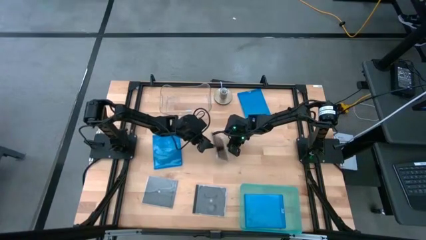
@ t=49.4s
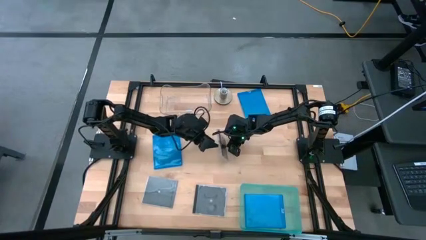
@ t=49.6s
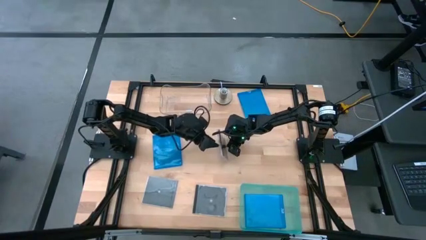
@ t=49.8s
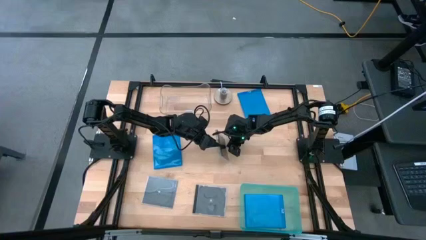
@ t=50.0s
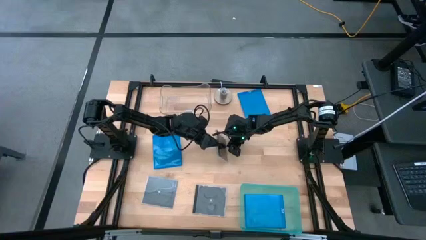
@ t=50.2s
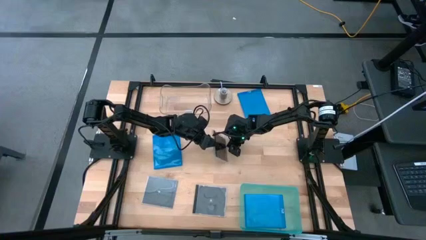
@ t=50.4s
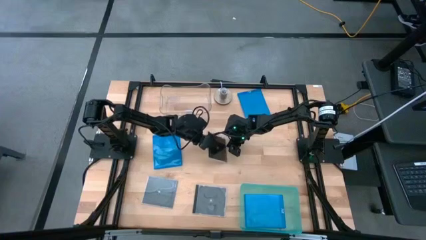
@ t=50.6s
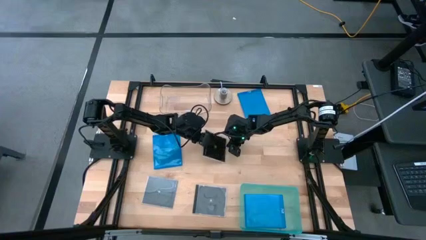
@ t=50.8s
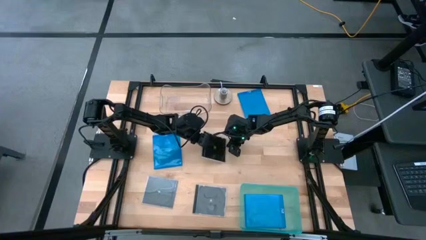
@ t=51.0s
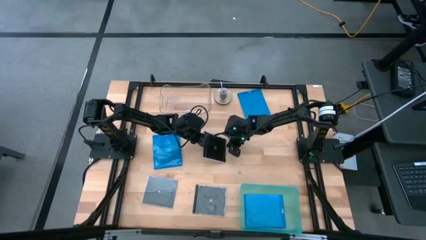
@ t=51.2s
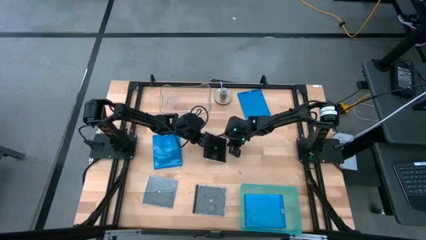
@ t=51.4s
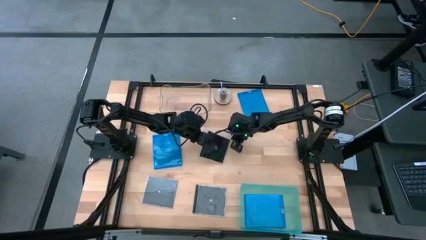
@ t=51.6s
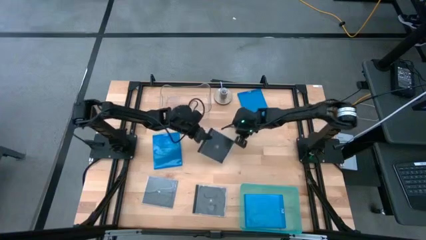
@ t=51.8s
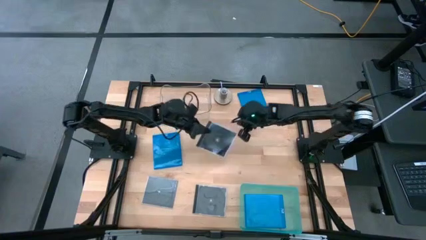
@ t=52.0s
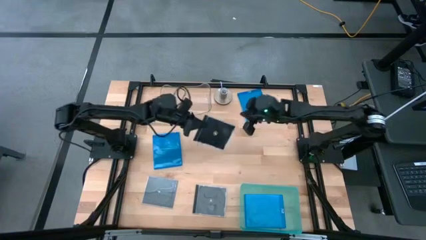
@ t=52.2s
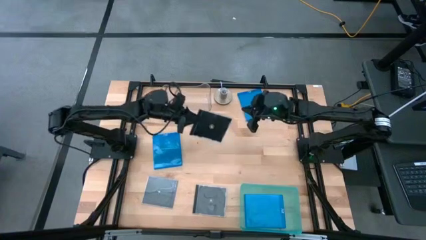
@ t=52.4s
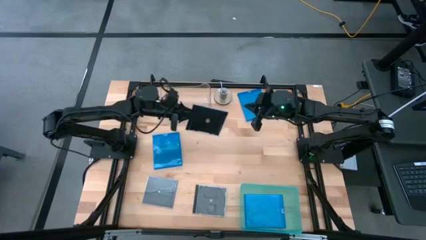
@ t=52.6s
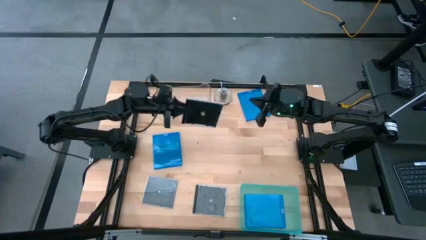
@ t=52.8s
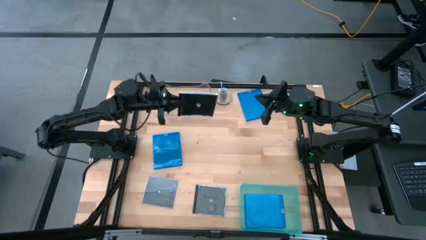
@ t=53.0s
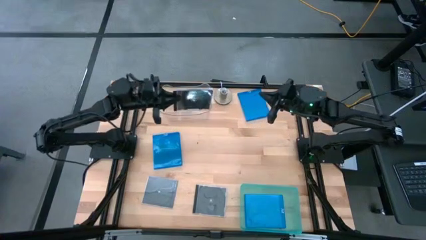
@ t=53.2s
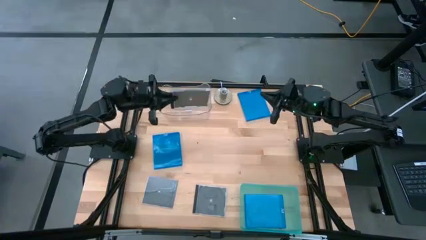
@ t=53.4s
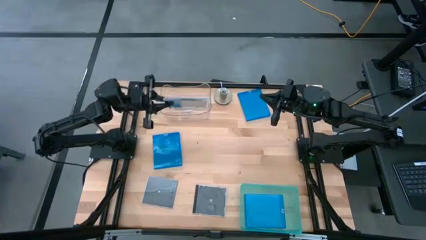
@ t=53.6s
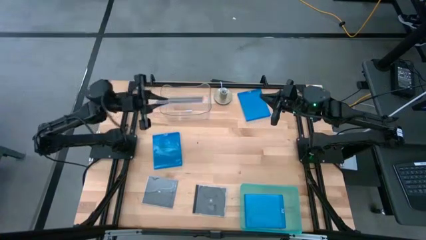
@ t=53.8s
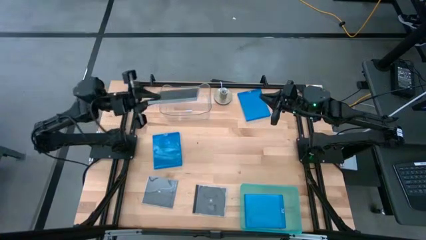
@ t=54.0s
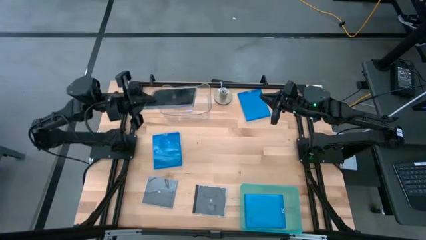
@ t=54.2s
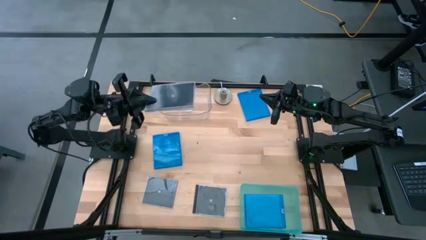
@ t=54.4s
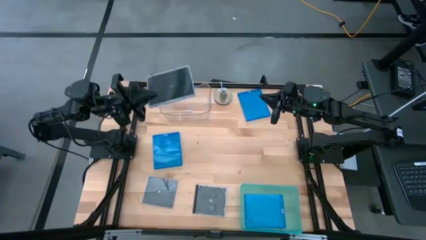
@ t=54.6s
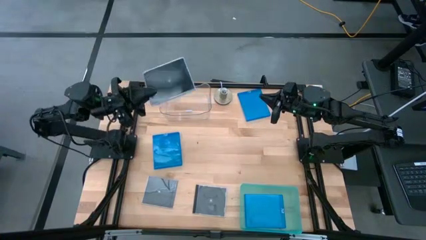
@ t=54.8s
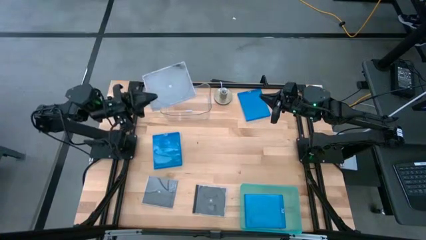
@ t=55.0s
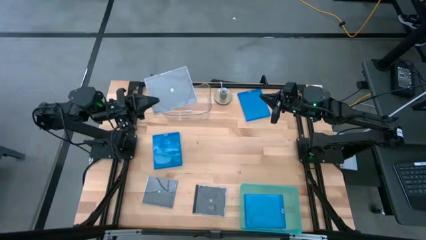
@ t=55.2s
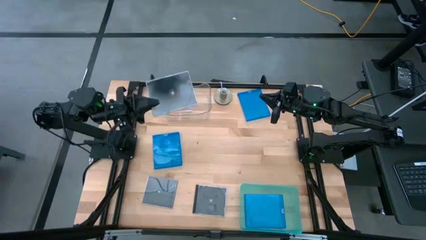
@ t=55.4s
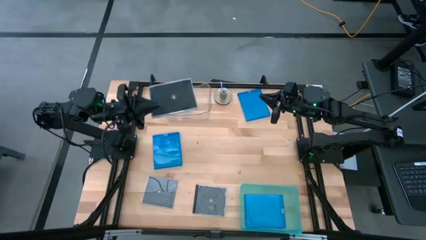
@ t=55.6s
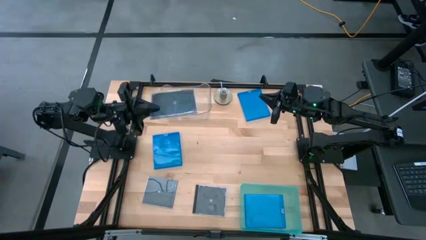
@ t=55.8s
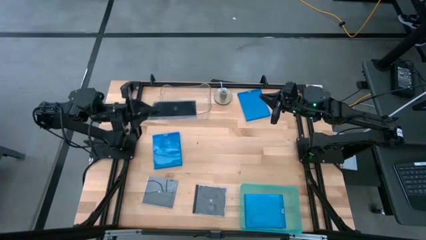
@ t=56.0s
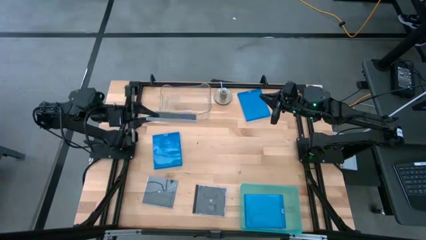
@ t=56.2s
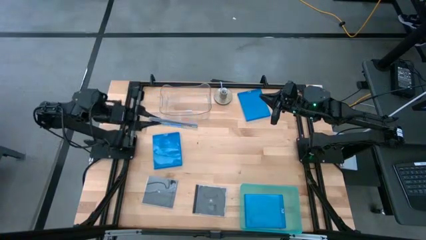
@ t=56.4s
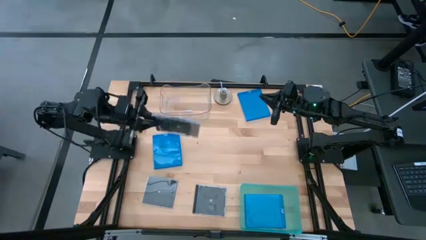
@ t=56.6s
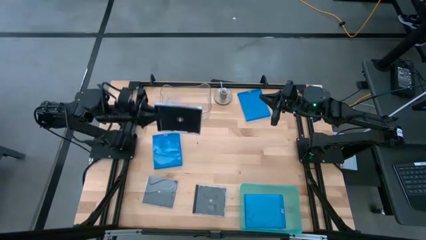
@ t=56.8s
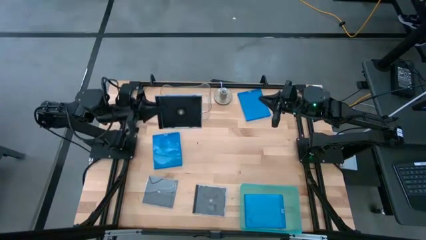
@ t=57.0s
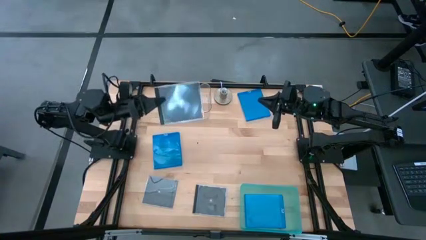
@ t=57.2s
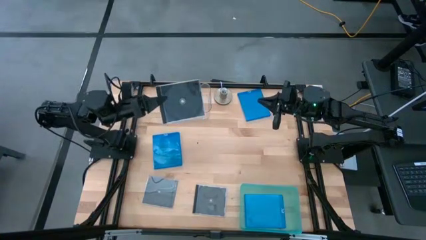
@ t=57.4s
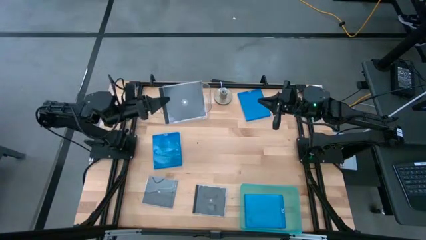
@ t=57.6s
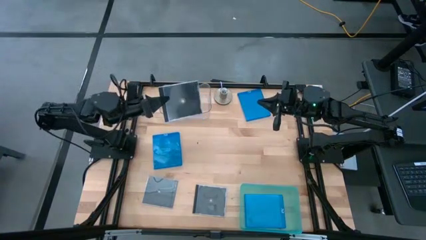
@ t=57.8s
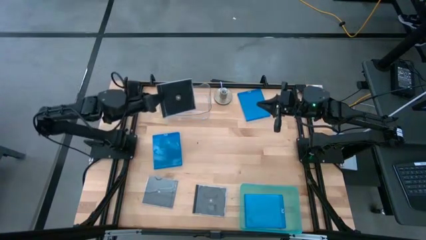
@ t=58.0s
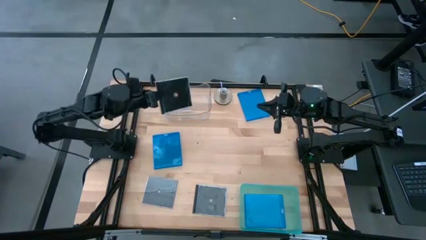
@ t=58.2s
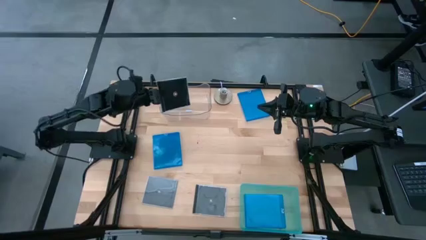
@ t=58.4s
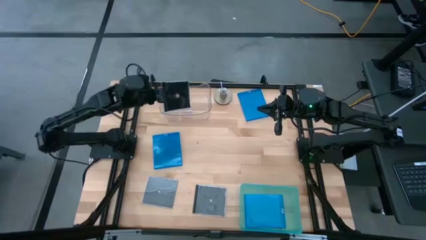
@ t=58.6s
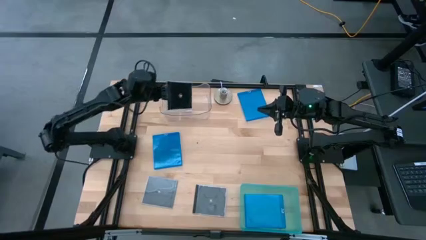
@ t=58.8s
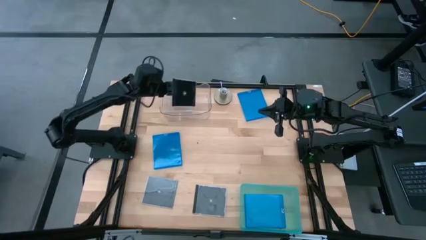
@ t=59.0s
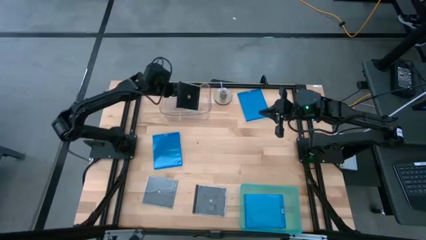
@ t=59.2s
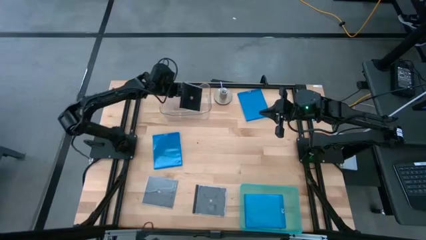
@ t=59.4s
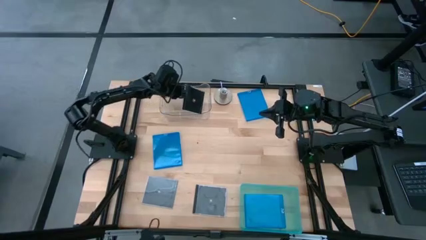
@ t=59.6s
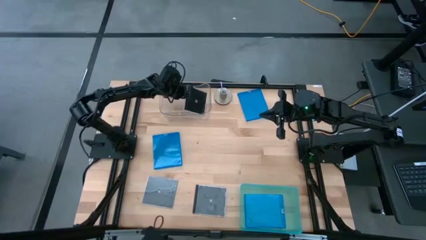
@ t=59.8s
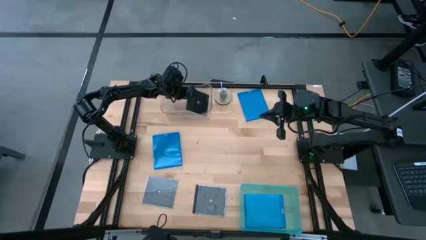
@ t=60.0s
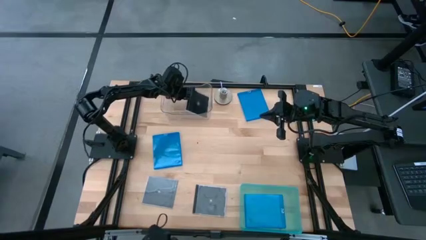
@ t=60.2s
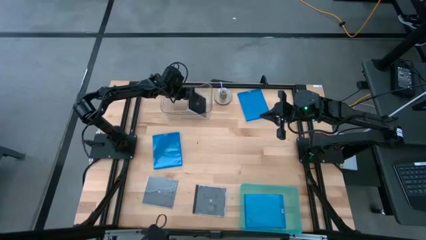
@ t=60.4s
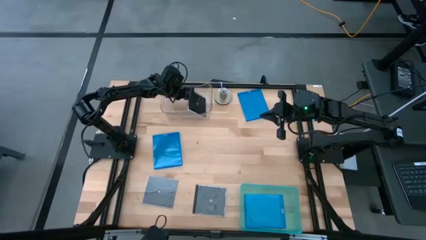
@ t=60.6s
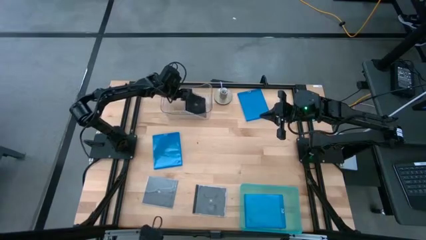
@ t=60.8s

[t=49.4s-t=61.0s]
Task: Pick & place jewel cases by type
Put the top black cd case into the transparent bin
